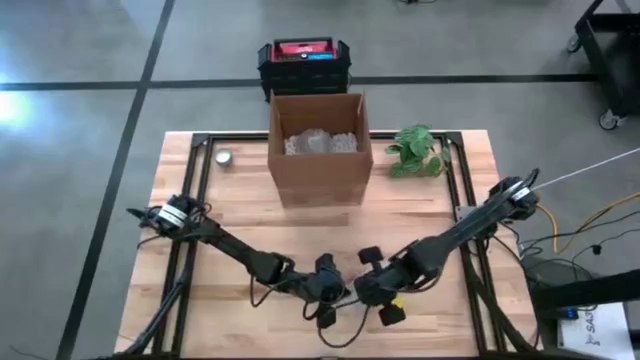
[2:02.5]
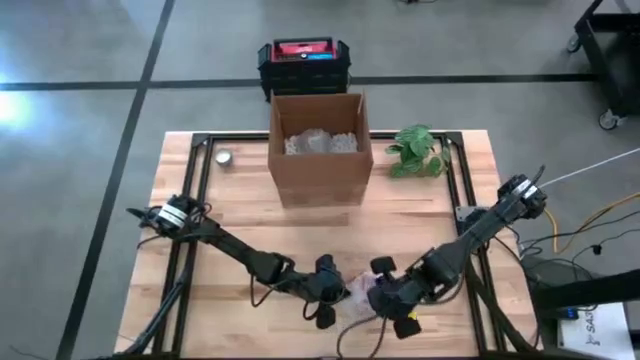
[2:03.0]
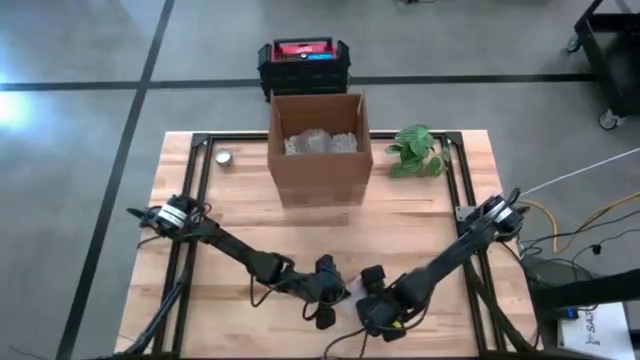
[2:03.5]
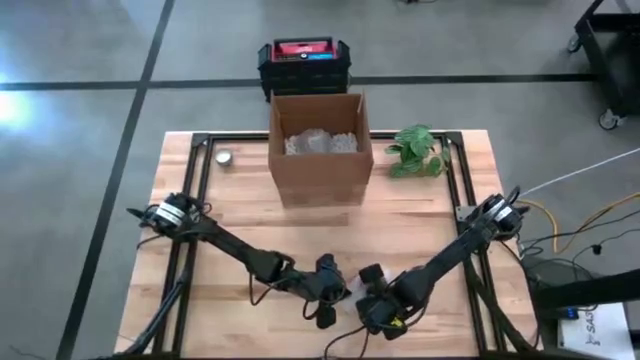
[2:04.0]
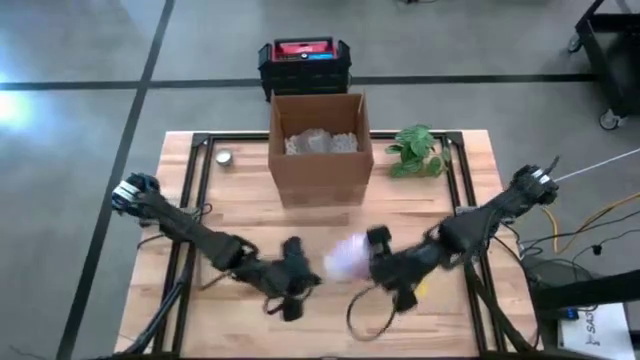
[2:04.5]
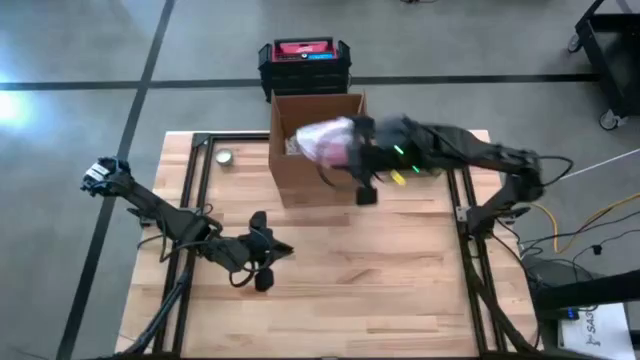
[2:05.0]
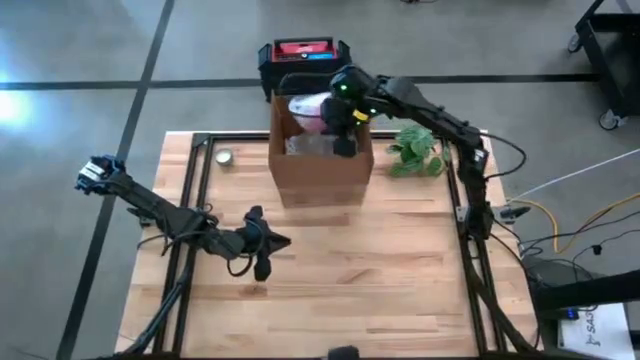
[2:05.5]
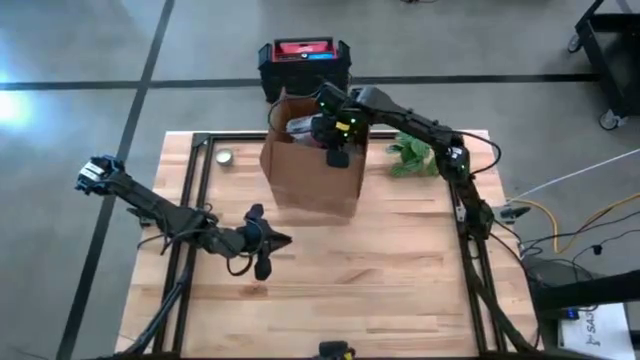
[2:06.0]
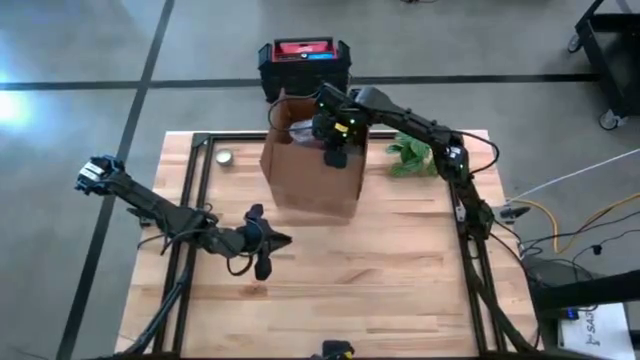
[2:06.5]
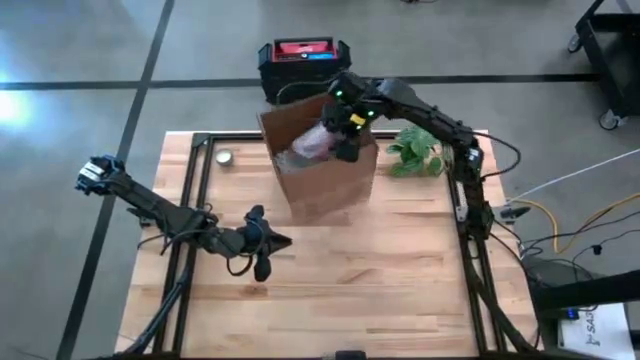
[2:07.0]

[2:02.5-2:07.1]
Task: wrap mug
Put the wrapped orange mug into the cardboard box

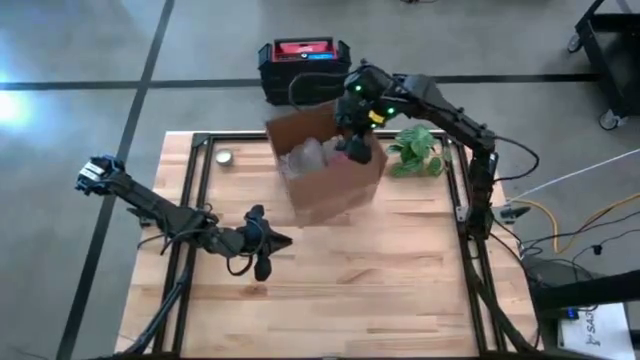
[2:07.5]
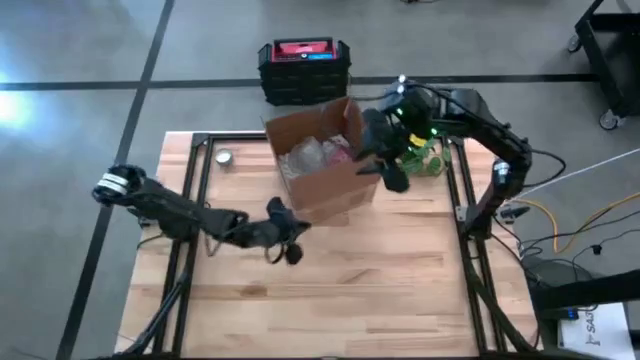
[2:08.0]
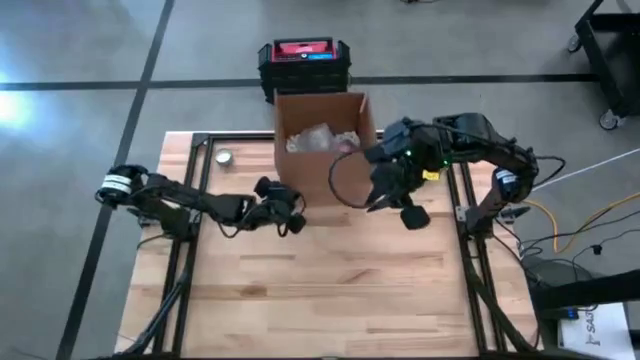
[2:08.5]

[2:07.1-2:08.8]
Adjust the cardboard box

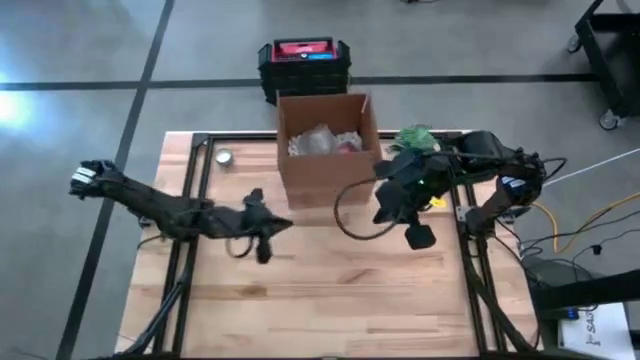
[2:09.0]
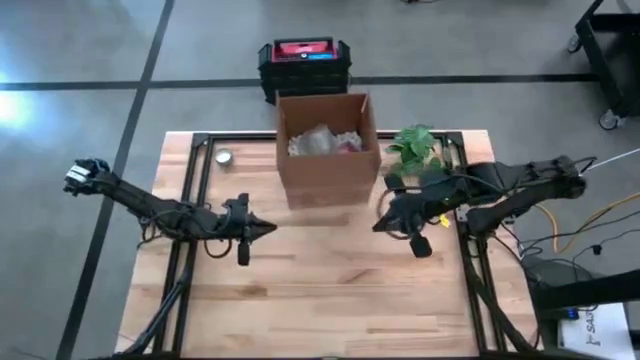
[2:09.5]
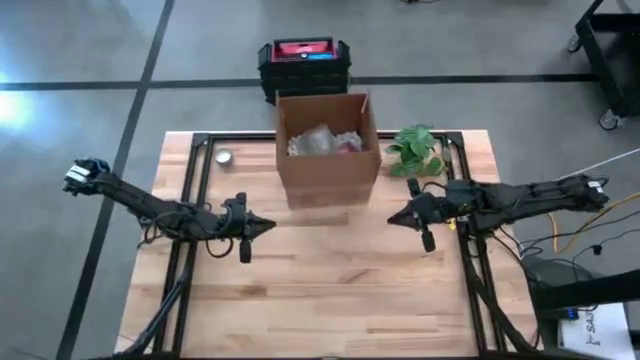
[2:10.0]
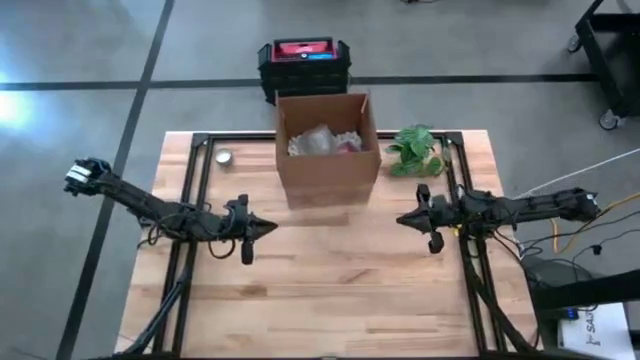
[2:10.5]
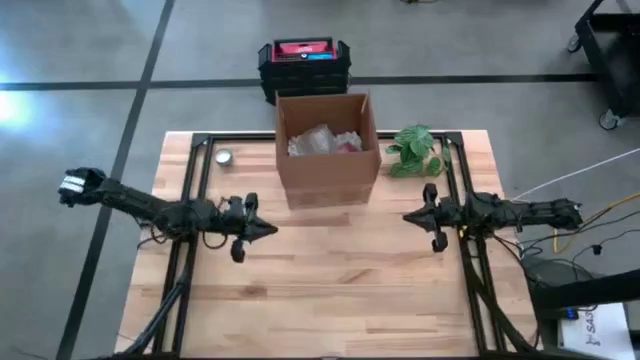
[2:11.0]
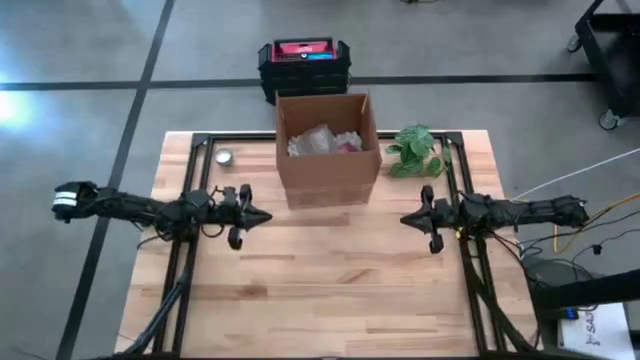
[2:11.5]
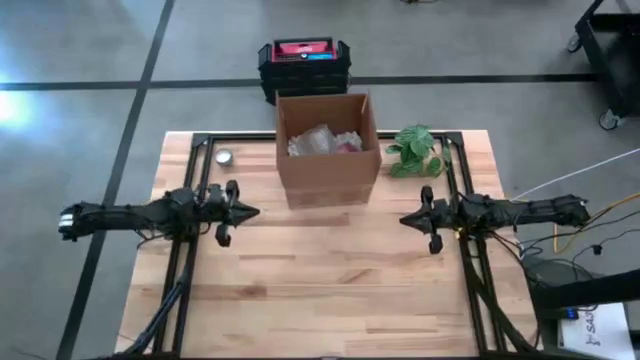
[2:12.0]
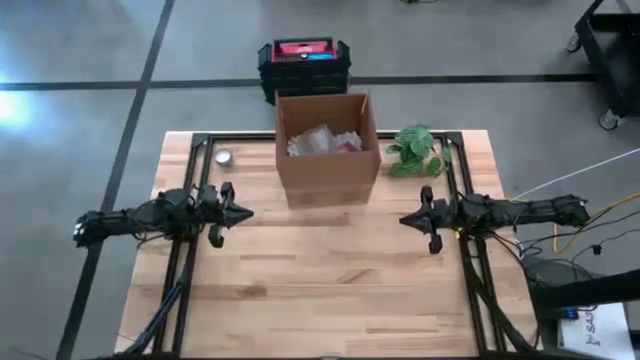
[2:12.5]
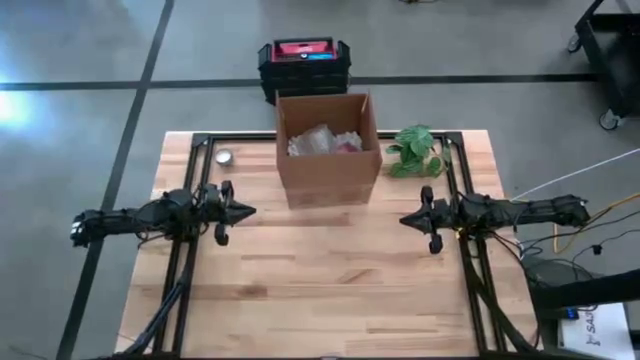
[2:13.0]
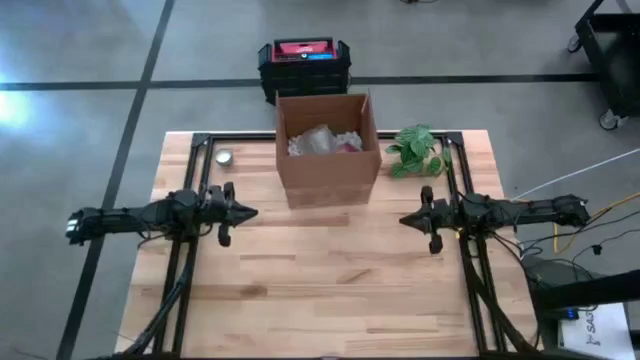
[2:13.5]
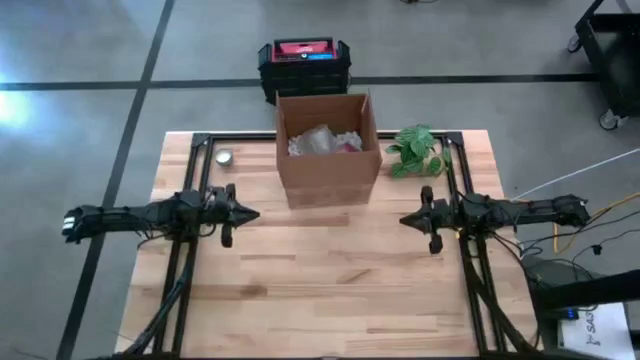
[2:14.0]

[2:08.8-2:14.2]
Return to Home Position

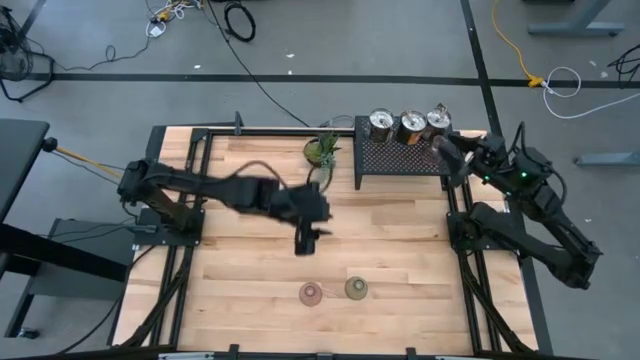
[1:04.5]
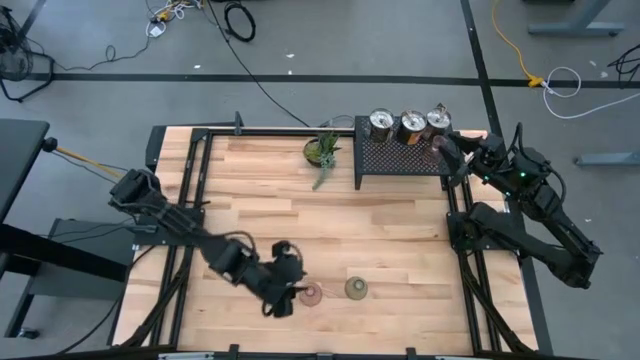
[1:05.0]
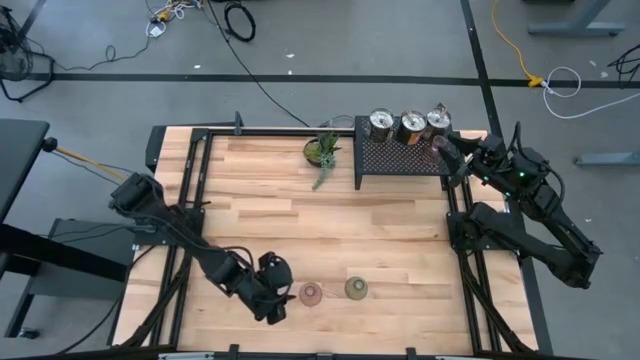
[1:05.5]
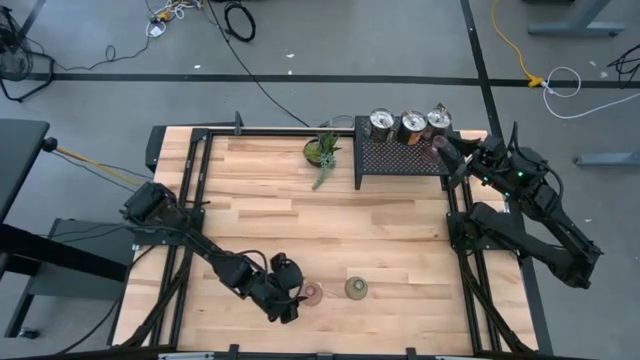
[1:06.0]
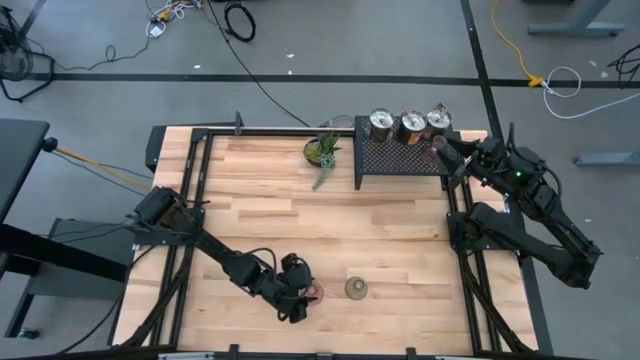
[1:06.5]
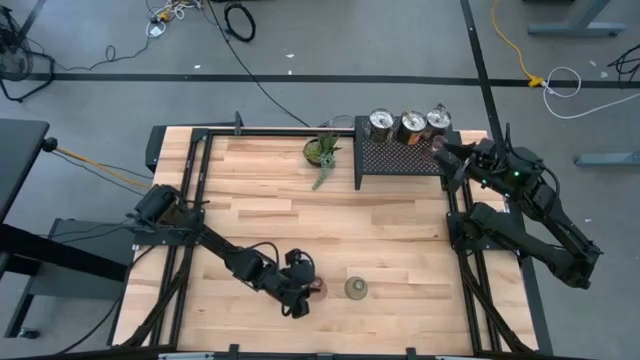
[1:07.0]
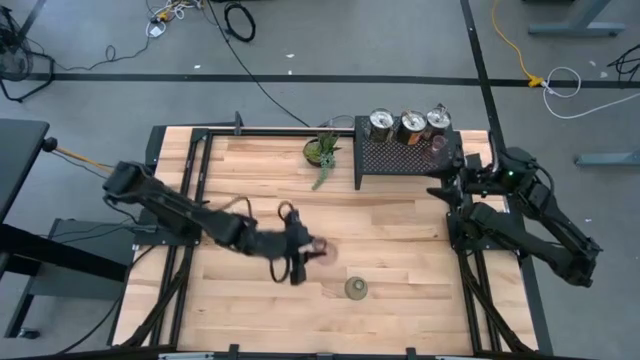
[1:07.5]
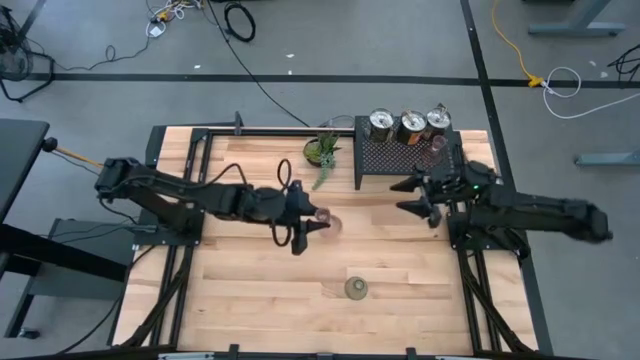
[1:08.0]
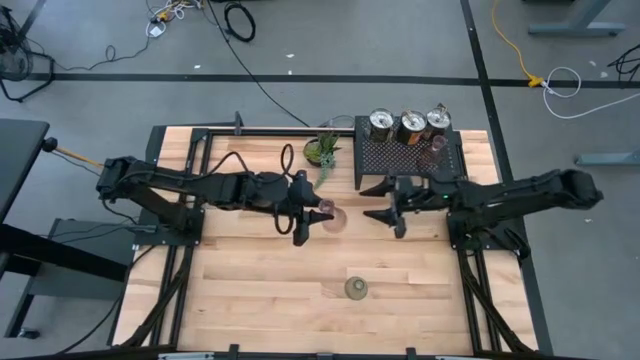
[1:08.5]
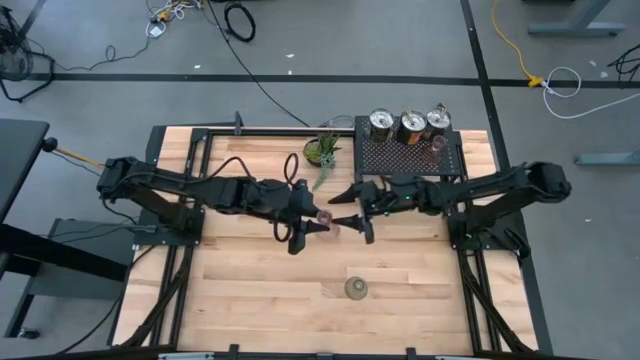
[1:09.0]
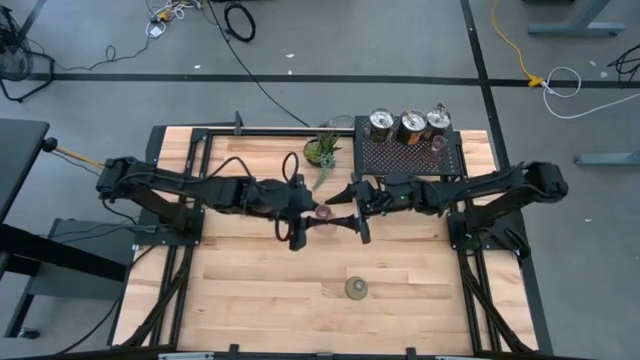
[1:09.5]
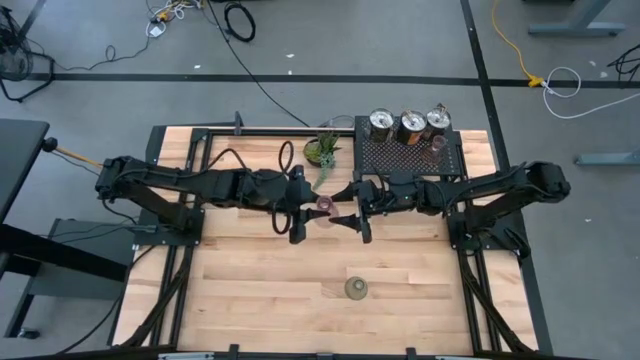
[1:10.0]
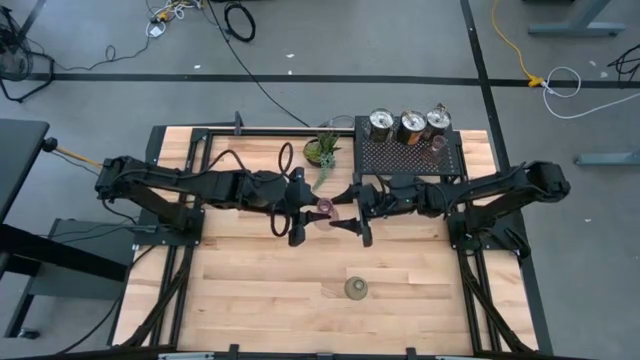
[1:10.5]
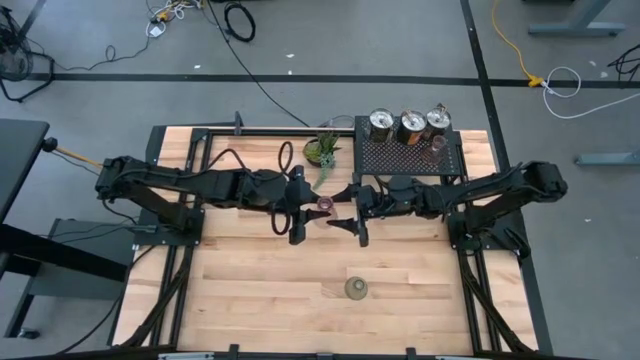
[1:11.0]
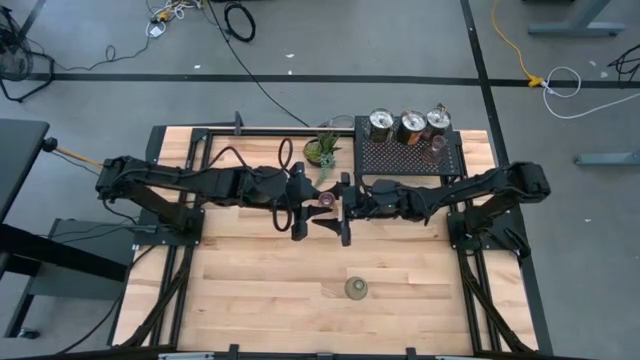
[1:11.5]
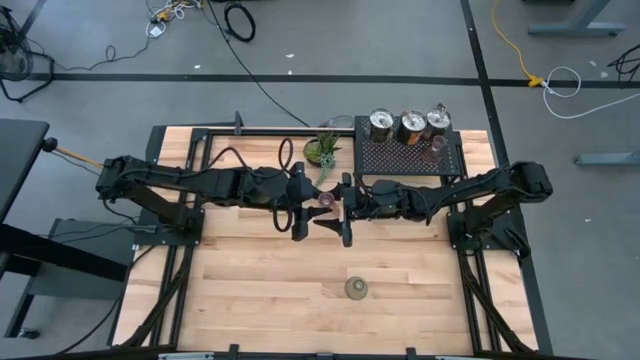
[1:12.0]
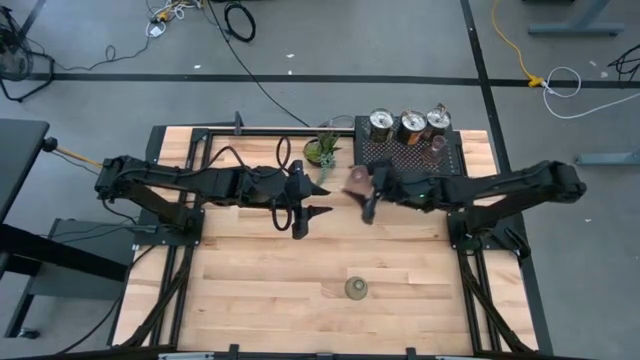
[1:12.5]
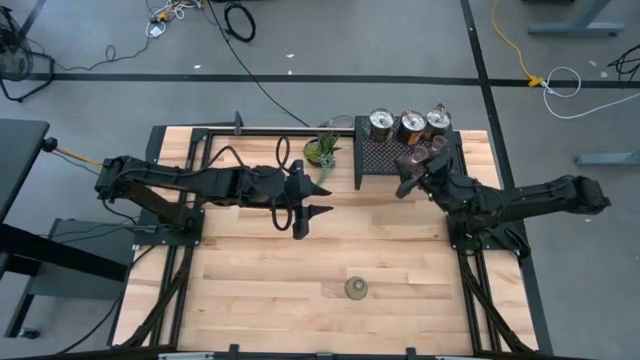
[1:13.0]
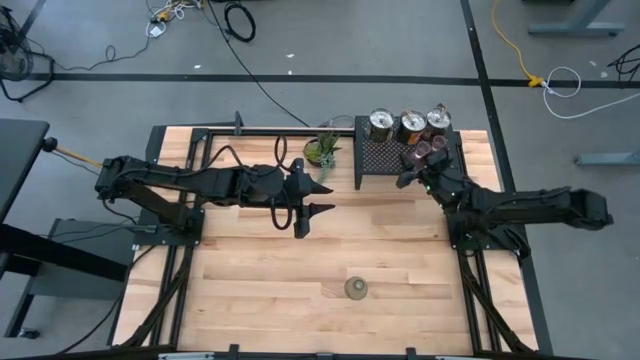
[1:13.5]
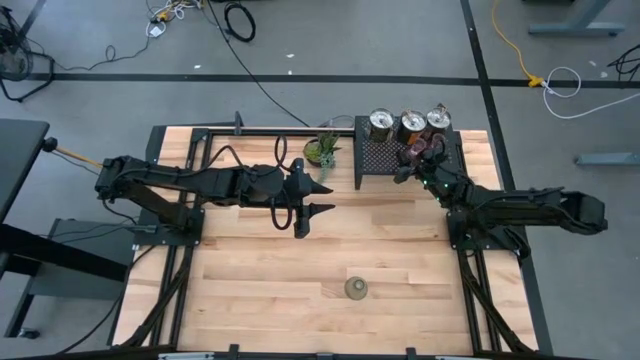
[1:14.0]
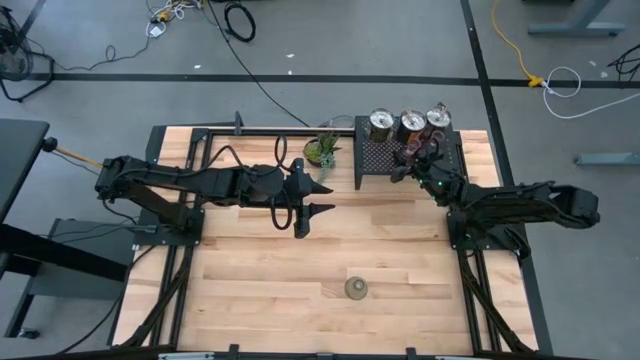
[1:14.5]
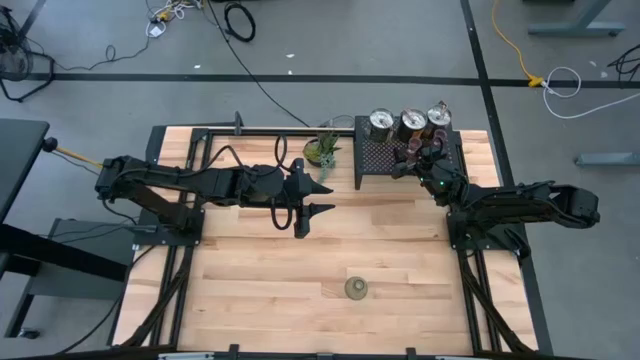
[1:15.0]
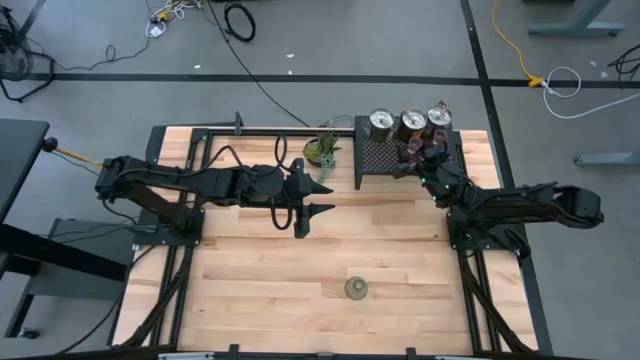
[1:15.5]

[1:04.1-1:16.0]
Task: Pick & Place candle stick holders
Align the pink glass candle holder with the pink glass candle holder on the shelf
